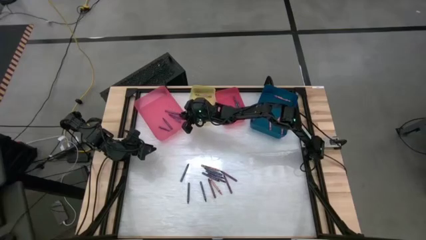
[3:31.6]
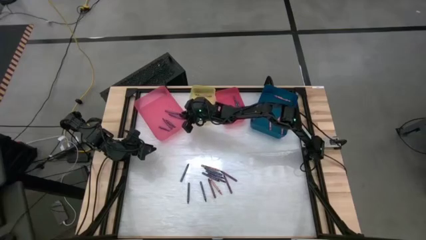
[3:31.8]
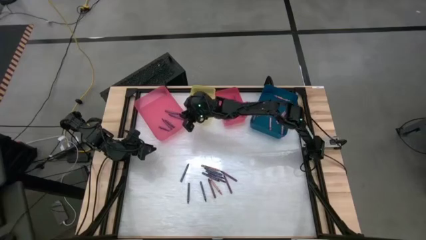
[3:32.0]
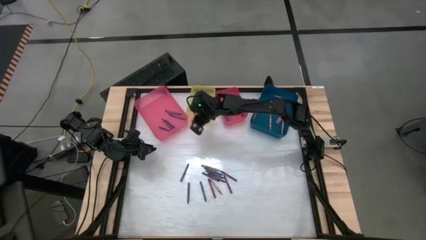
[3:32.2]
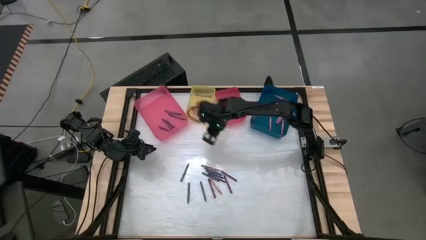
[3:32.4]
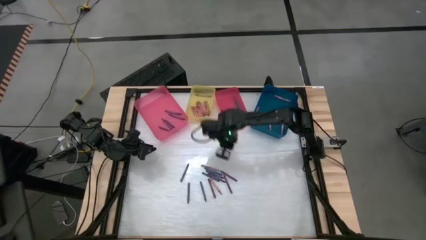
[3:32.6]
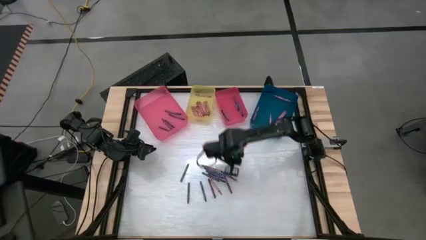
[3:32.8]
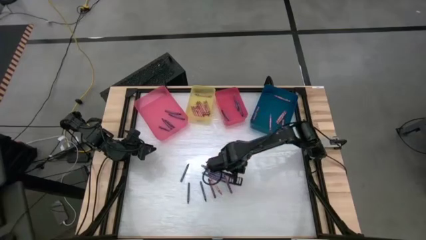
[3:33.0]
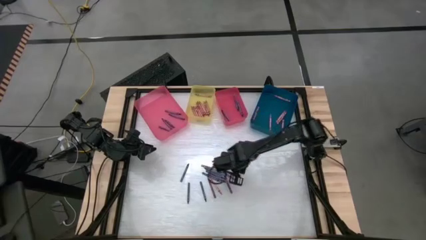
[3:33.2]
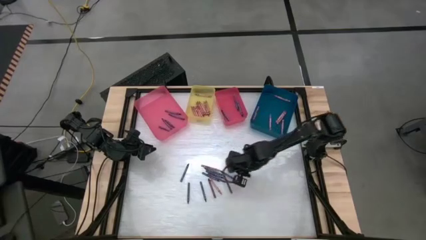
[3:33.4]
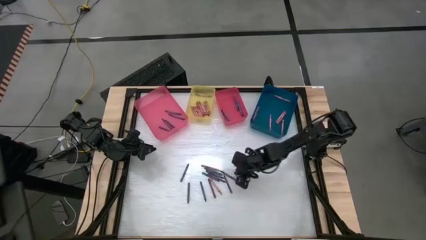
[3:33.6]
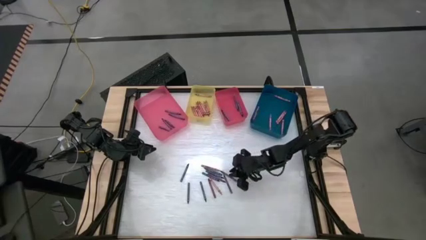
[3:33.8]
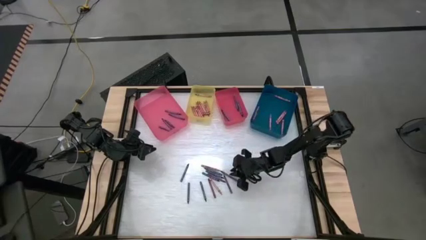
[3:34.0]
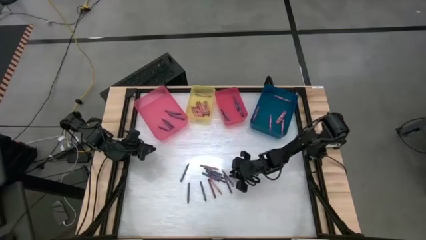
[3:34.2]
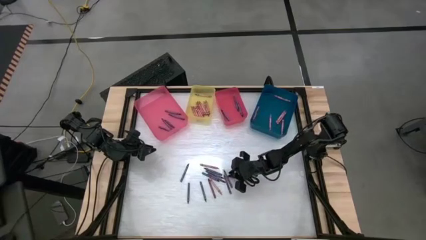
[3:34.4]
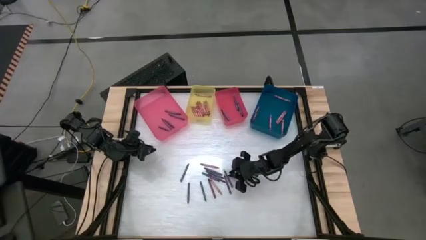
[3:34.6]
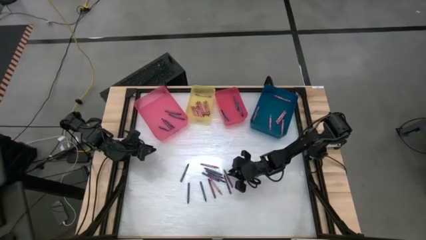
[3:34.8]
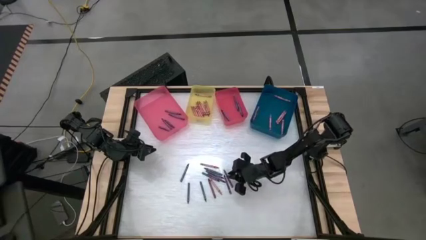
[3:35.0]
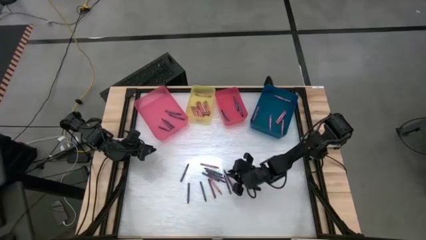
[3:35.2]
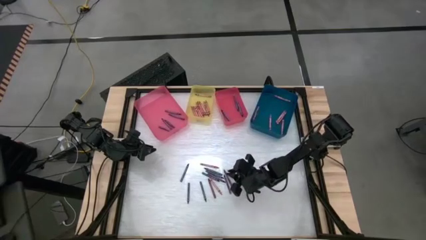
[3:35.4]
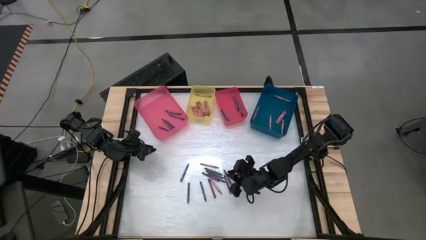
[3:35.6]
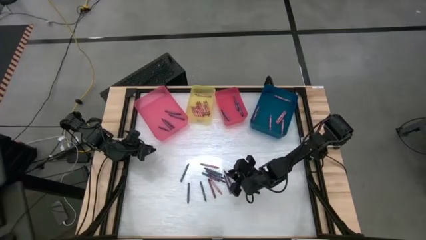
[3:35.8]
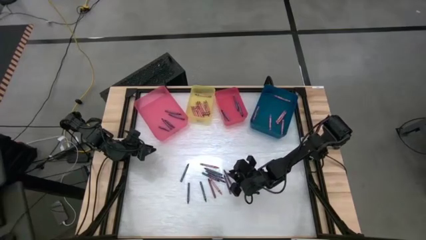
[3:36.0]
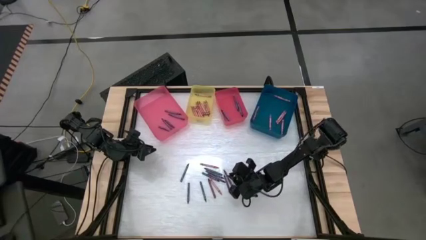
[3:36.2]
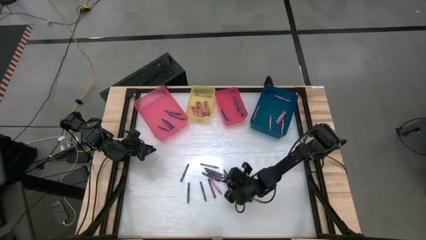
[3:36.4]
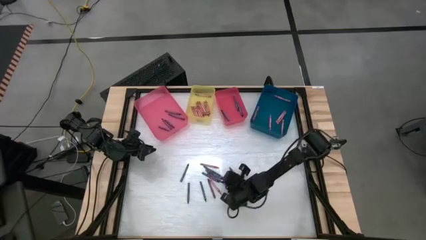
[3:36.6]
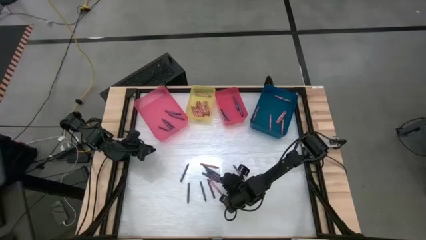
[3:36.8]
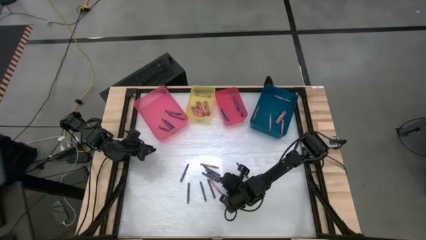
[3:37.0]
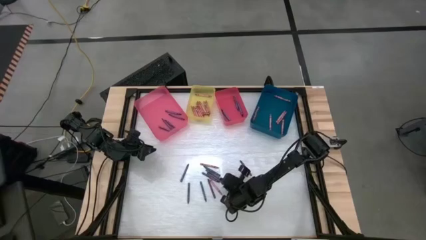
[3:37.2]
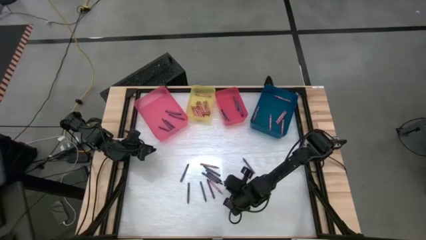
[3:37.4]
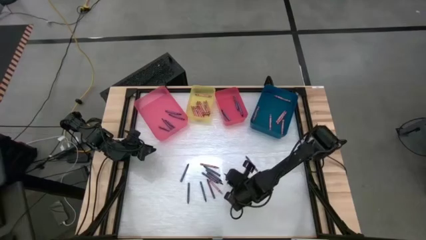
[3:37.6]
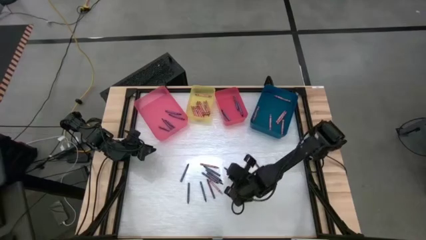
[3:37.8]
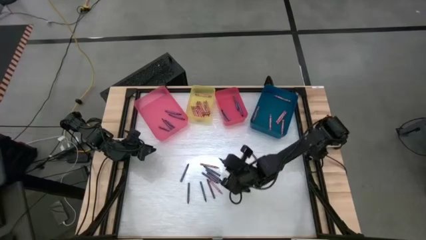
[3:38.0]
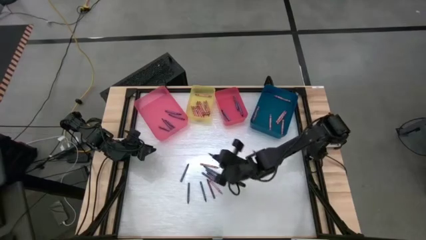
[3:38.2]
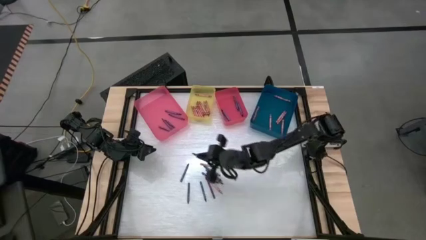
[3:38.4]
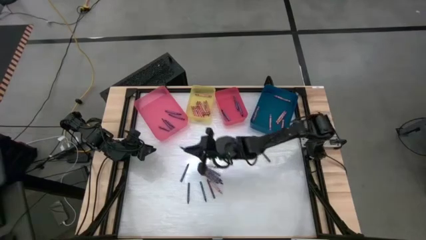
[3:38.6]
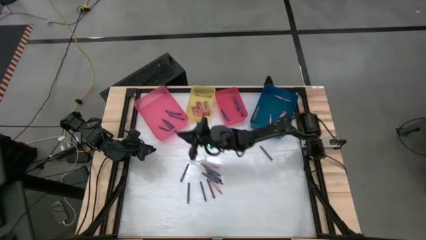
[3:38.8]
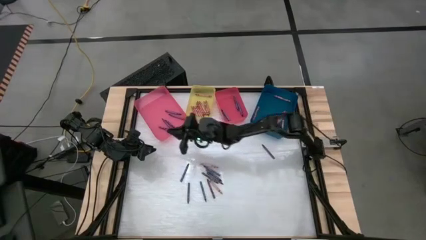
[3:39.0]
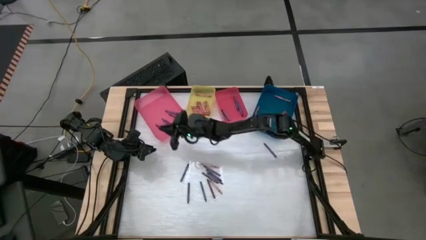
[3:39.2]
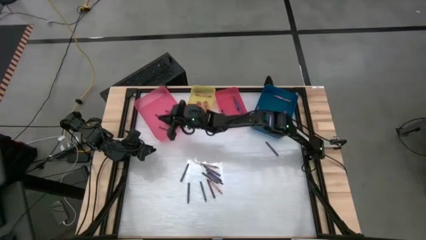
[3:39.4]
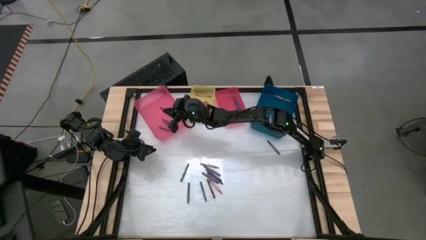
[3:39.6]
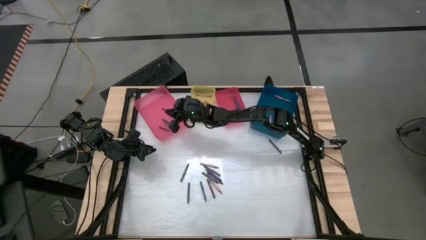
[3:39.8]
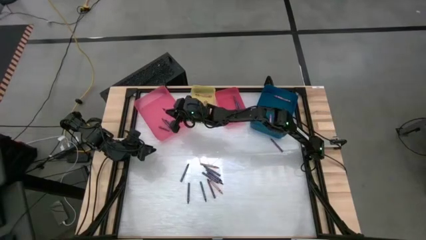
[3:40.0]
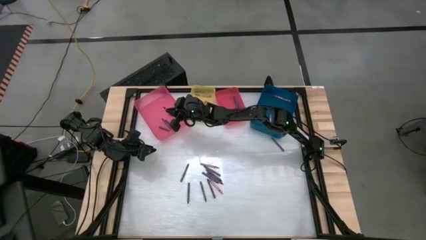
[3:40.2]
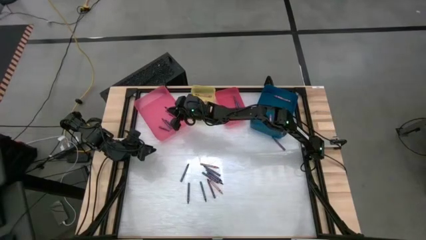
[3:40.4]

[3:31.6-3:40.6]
Task: Sort crayons
Put the violet crayon into the pink bin
